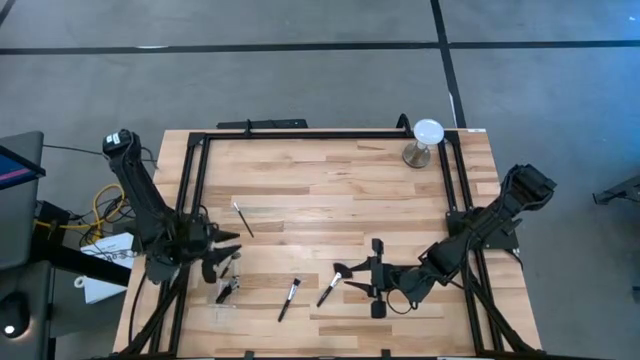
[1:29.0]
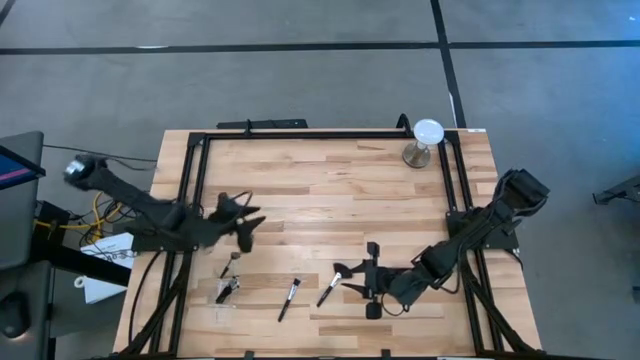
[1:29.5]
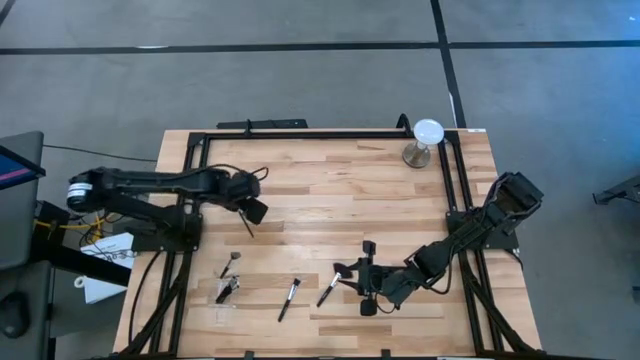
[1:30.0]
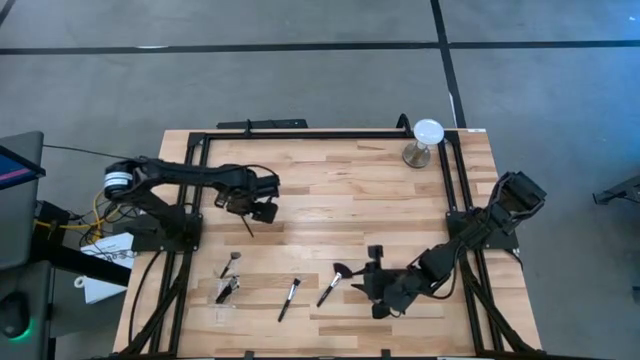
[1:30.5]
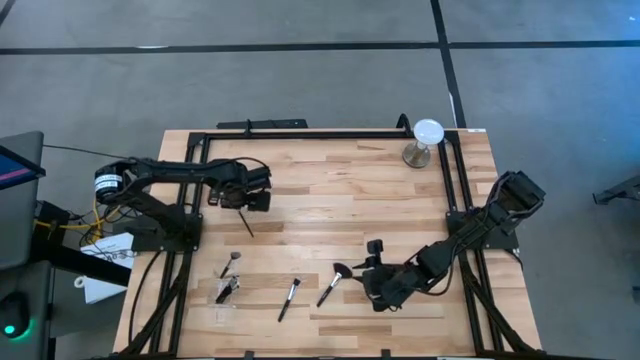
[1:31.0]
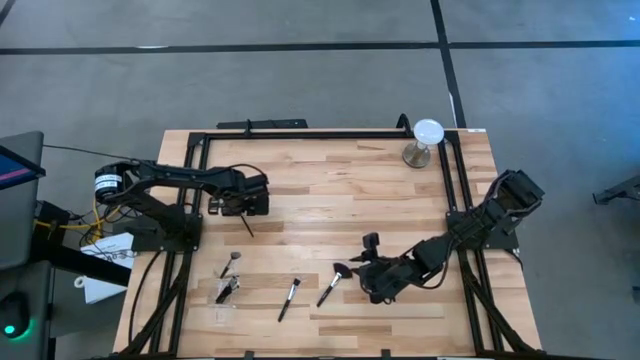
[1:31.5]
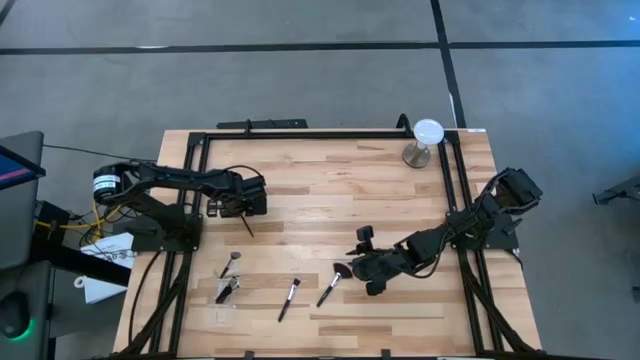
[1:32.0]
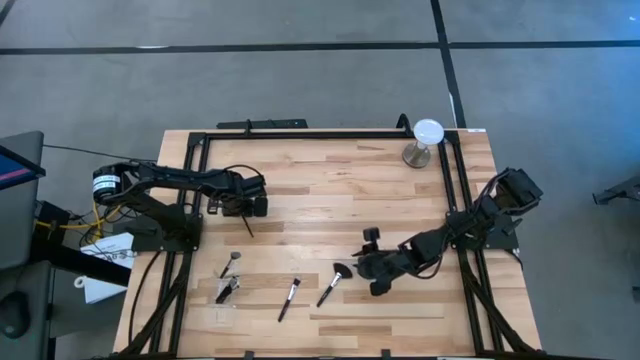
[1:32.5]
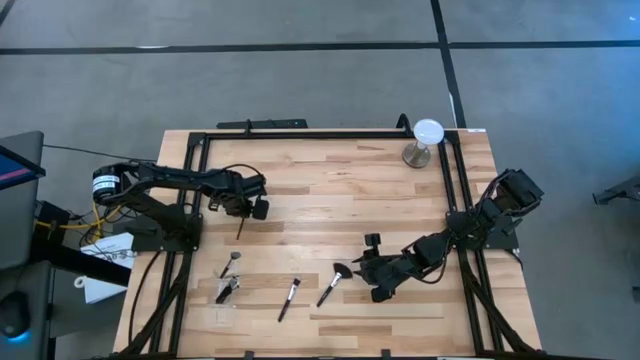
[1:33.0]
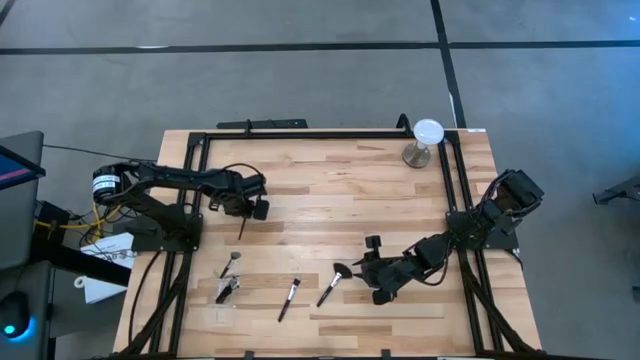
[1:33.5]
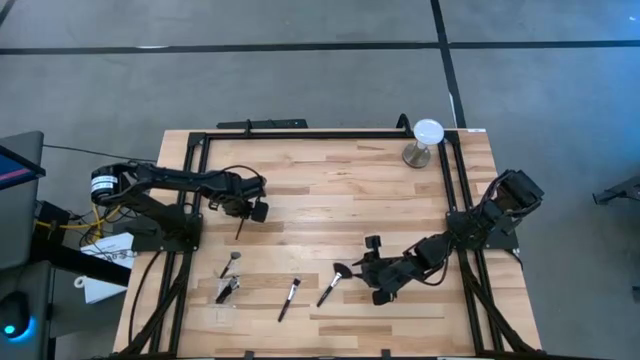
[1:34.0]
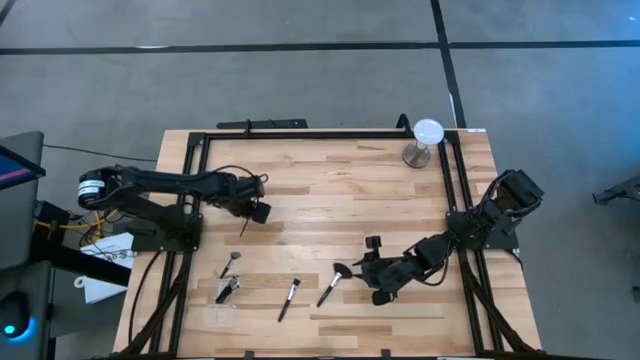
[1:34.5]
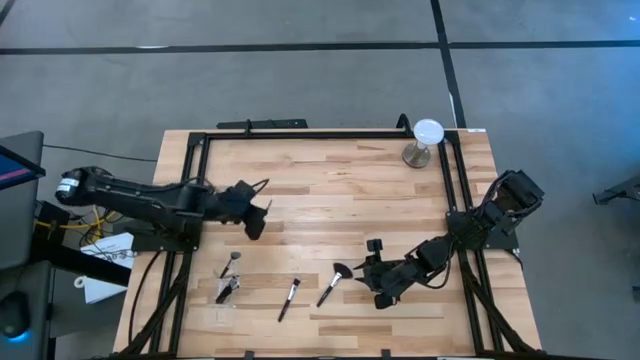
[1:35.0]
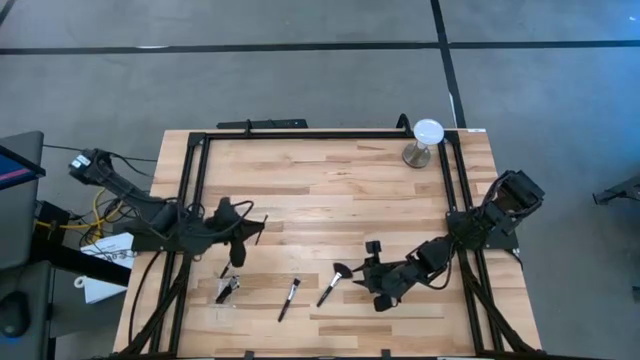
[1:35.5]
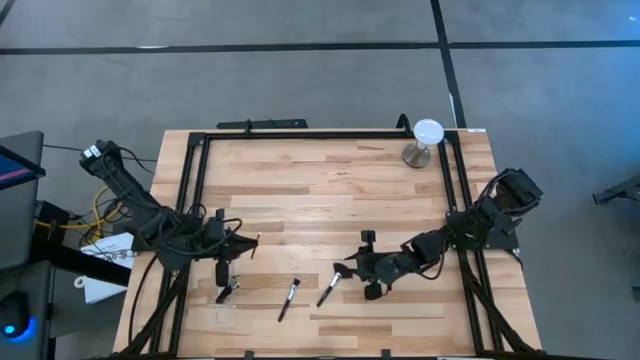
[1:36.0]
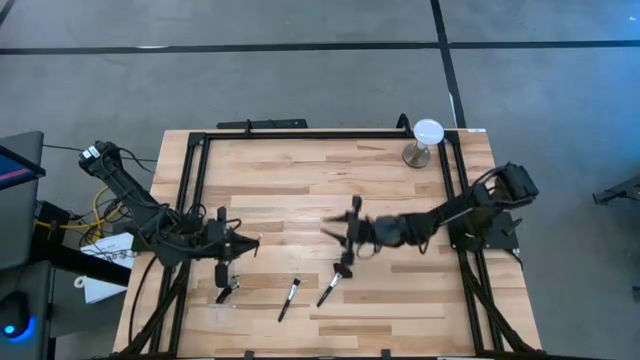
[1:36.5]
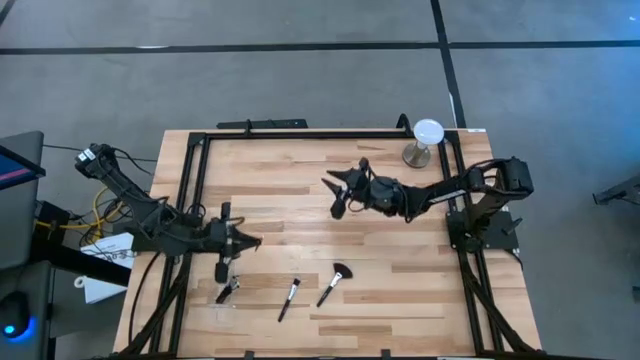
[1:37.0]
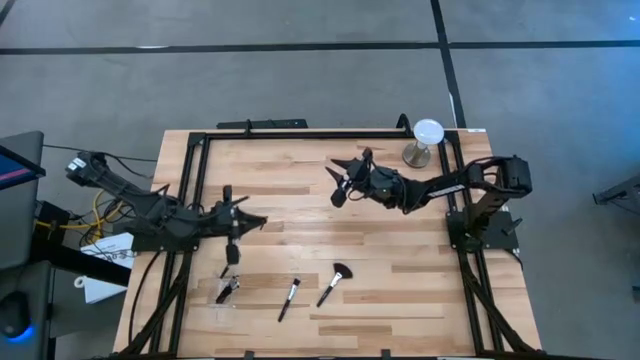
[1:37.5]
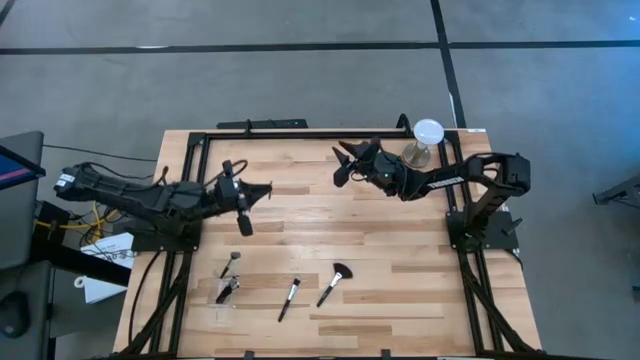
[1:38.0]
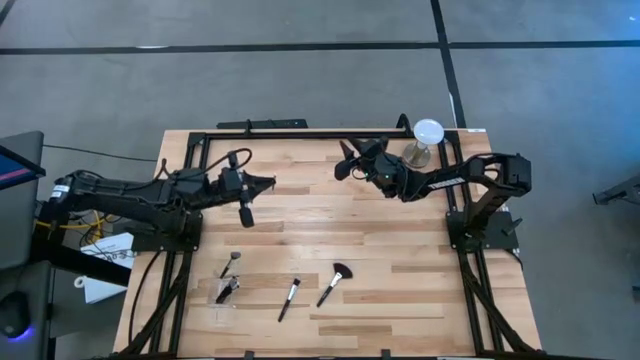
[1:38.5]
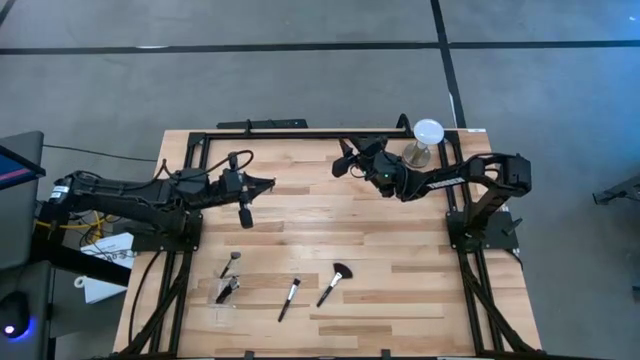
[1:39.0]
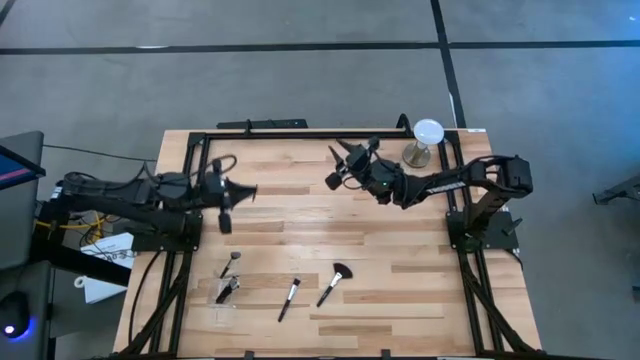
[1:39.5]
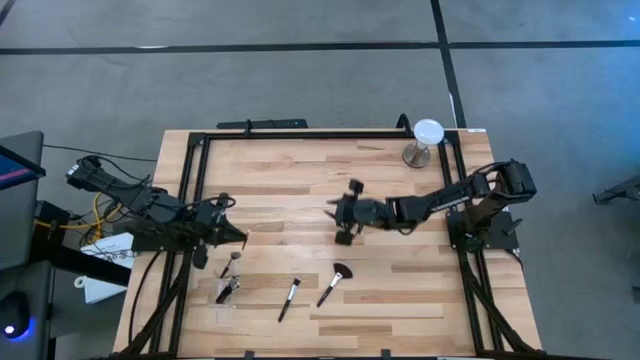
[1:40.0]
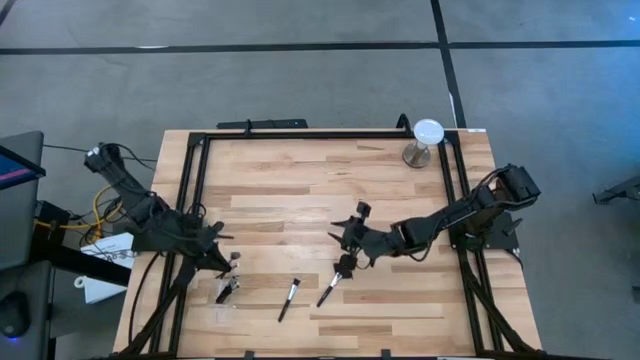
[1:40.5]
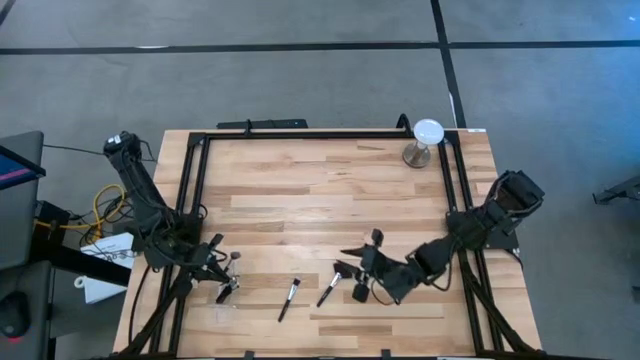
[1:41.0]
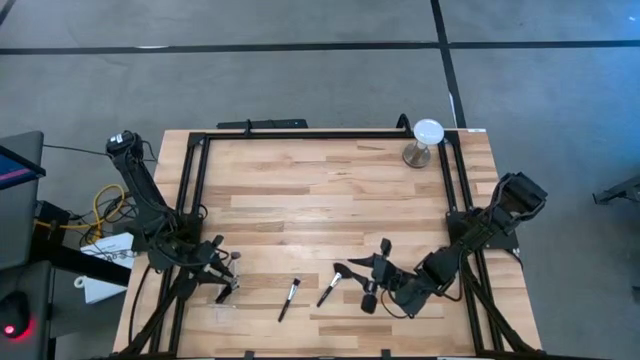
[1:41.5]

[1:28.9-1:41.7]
Task: Put items in baskets/containers
Put the eyeshadow brush into the transparent organizer

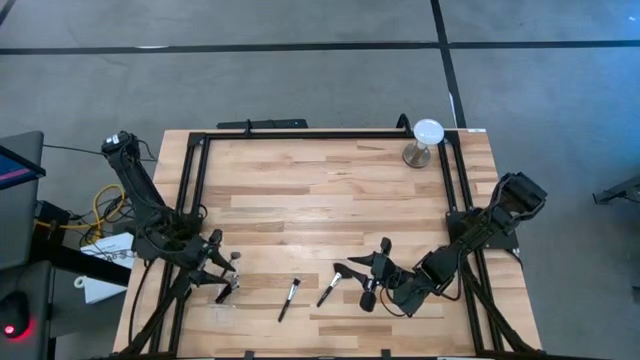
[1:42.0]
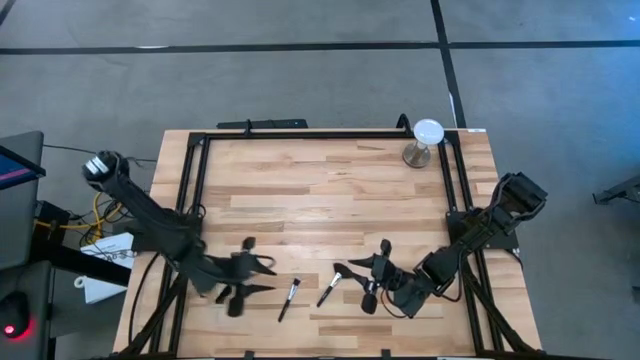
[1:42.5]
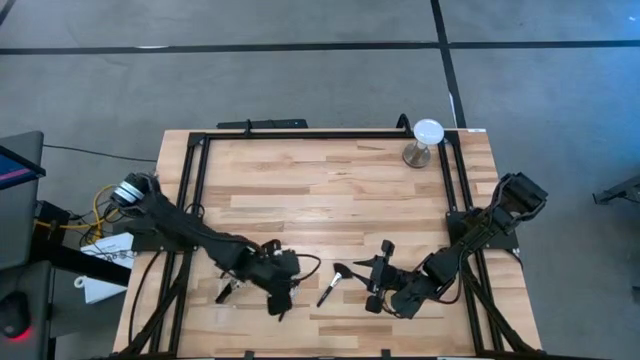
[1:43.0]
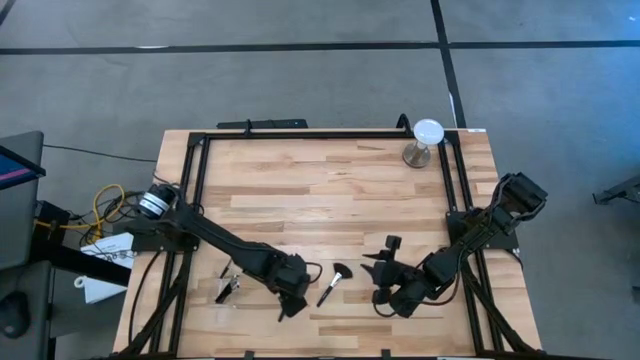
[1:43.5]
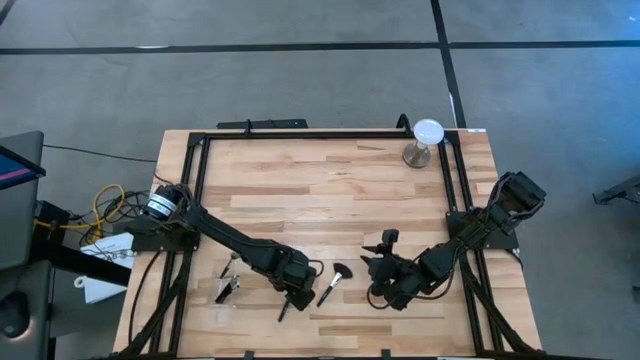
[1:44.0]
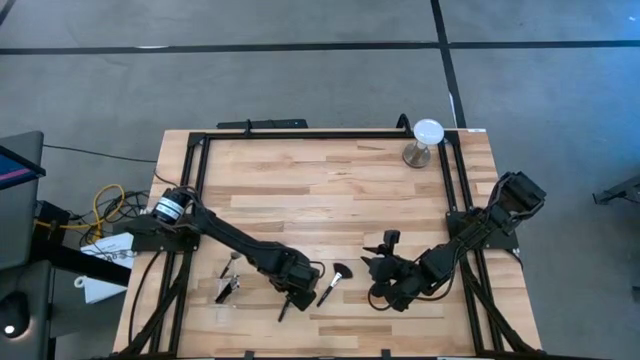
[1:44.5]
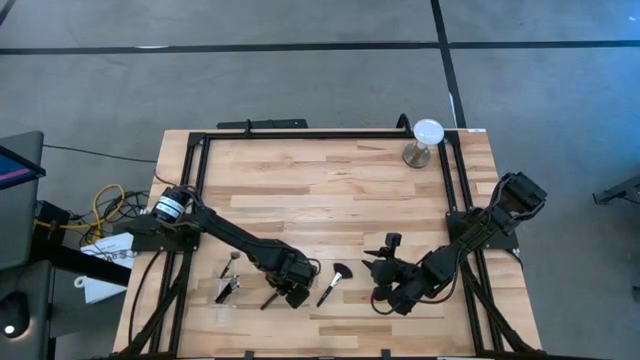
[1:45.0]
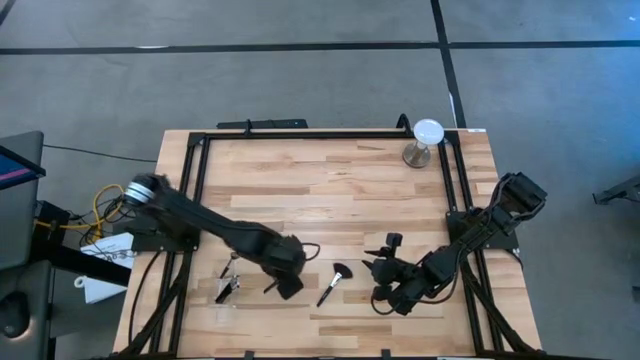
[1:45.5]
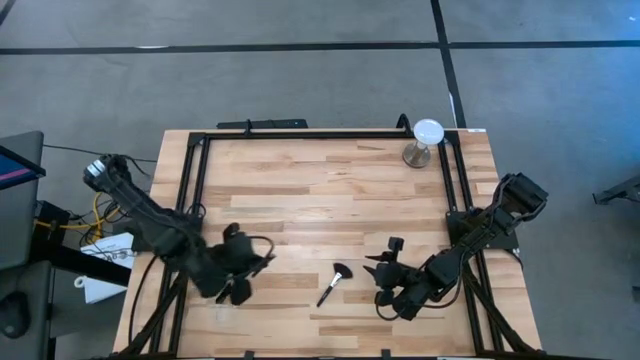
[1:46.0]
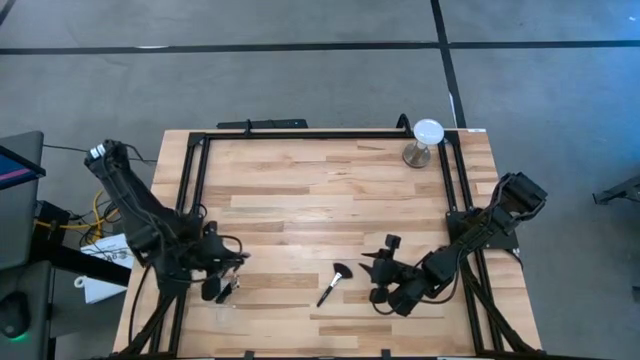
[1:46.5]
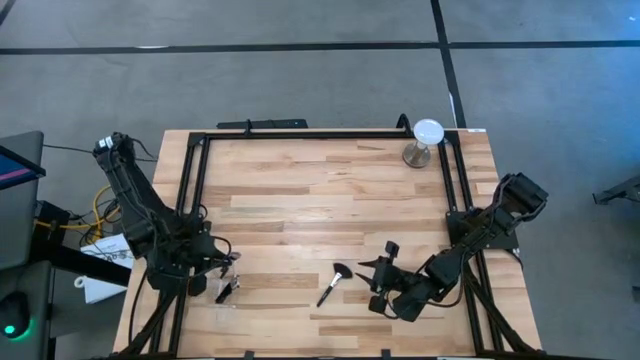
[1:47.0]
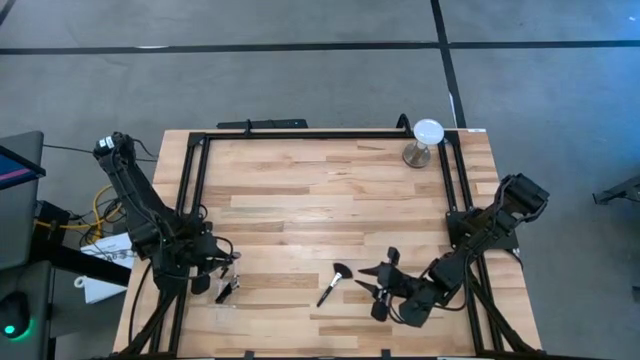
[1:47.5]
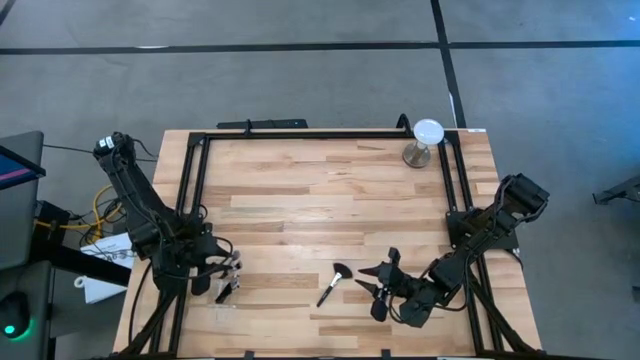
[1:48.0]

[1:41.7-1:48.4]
Put the blush brush into the transparent organizer

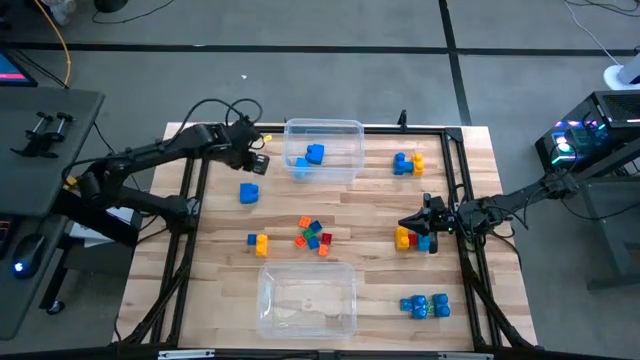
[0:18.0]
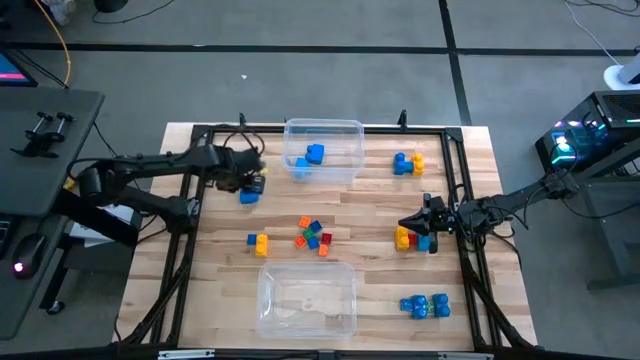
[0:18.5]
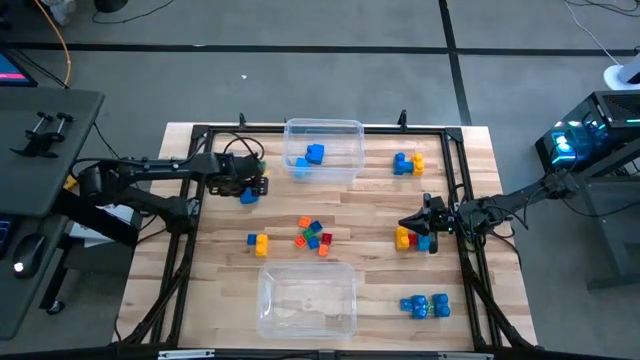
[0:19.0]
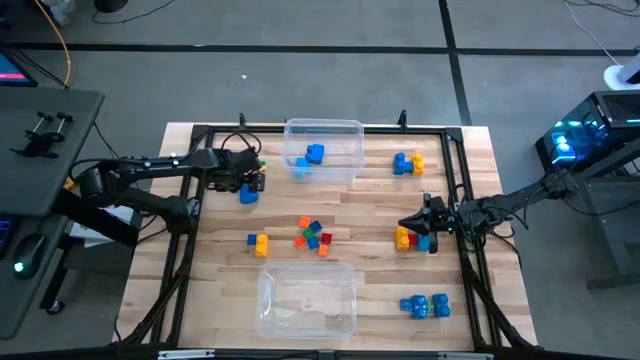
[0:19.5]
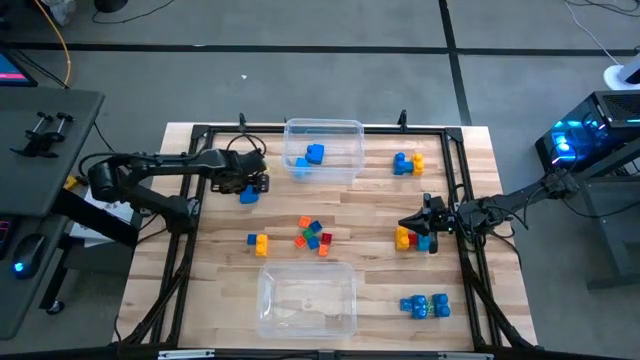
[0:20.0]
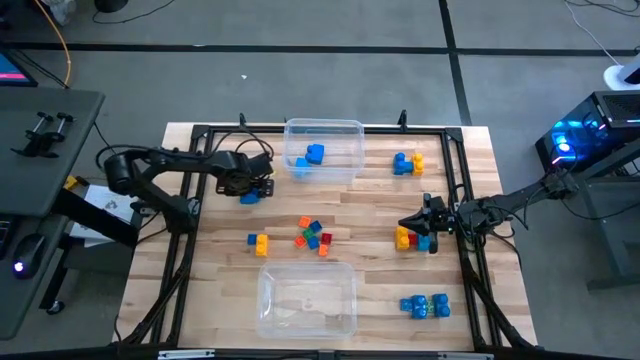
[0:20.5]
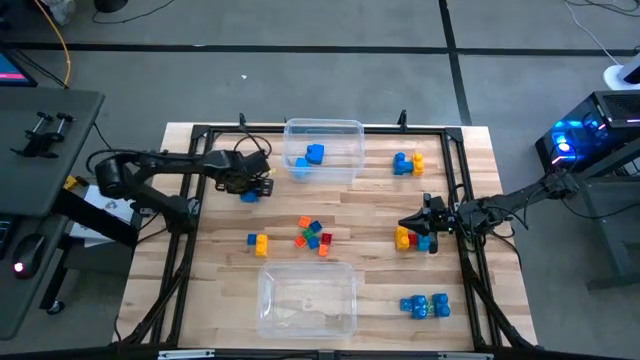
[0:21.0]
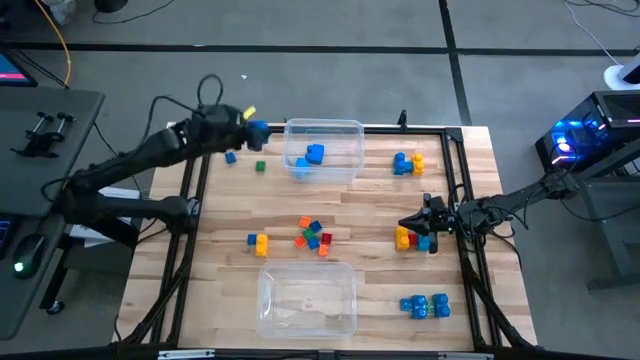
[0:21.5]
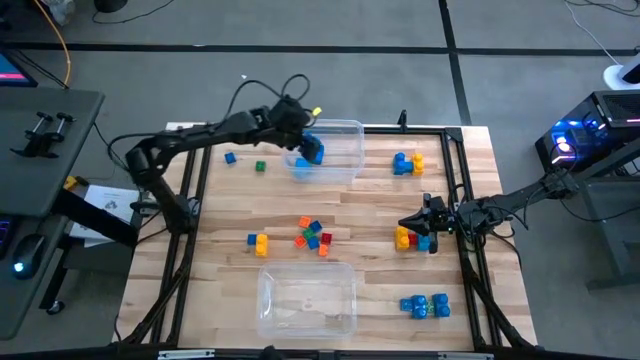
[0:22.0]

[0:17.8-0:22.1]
Task: Sort blocks by size
Put the large blue game piece into the top transparent bin
